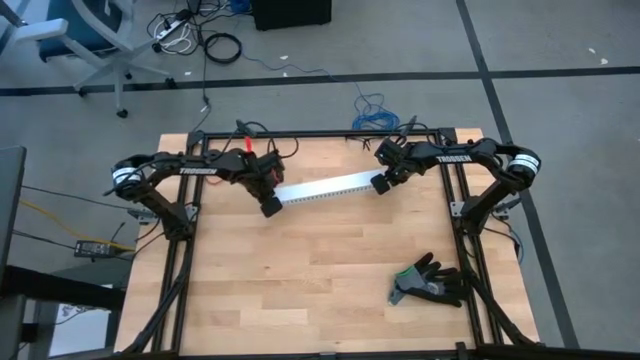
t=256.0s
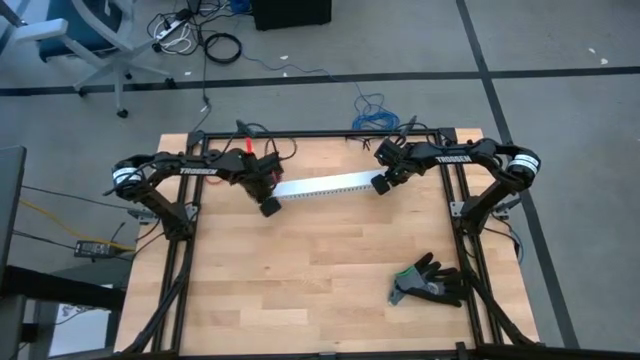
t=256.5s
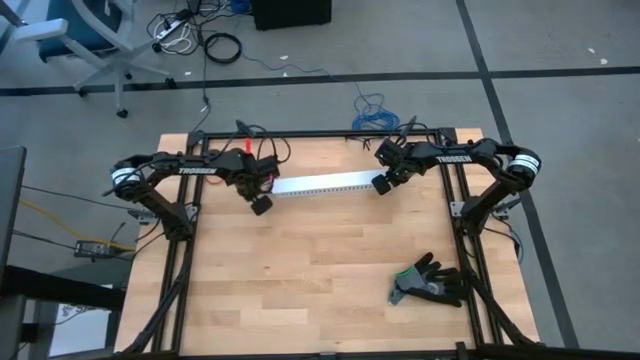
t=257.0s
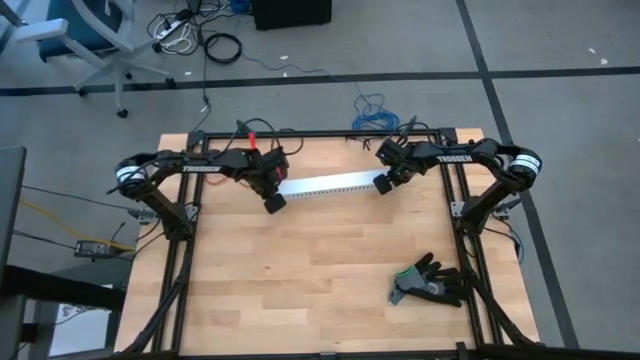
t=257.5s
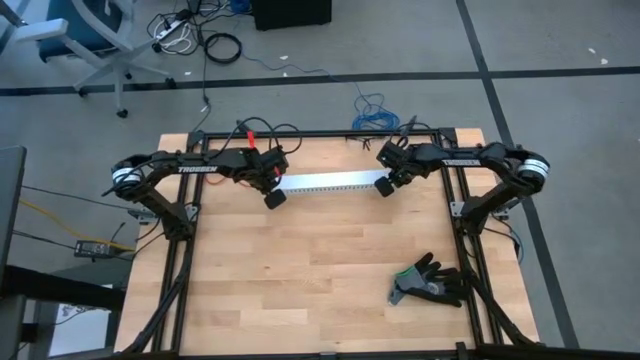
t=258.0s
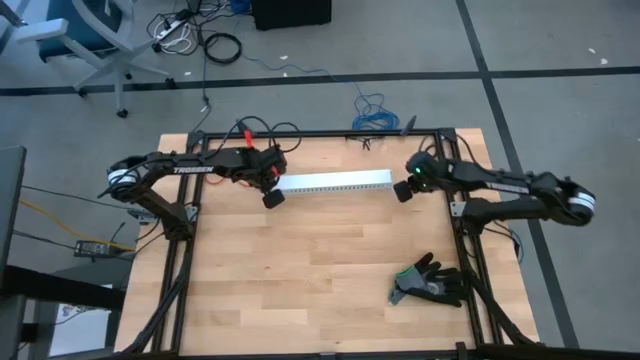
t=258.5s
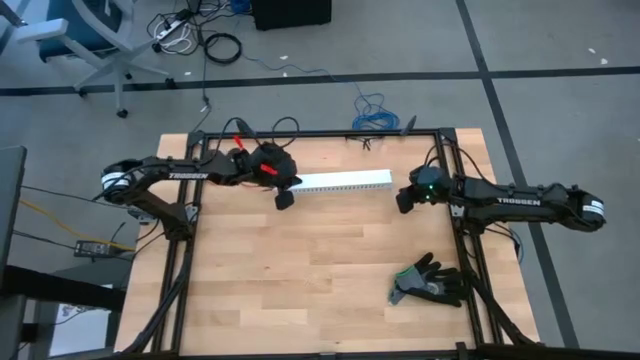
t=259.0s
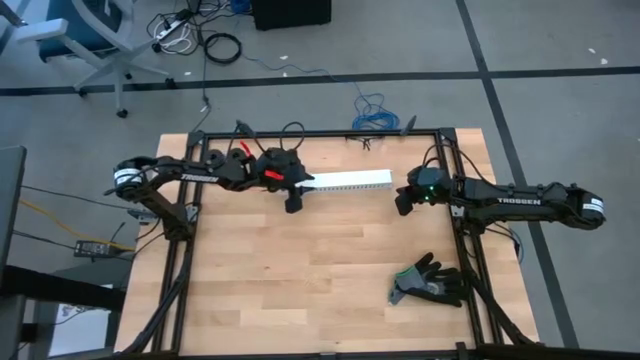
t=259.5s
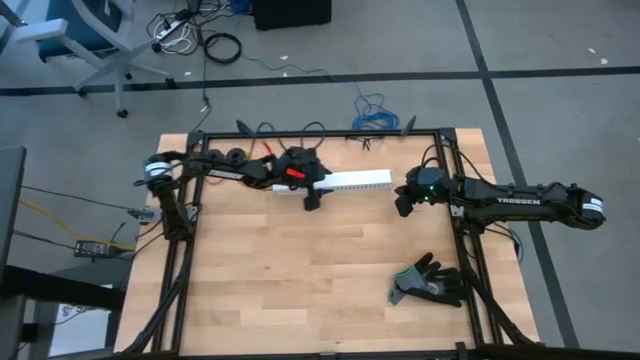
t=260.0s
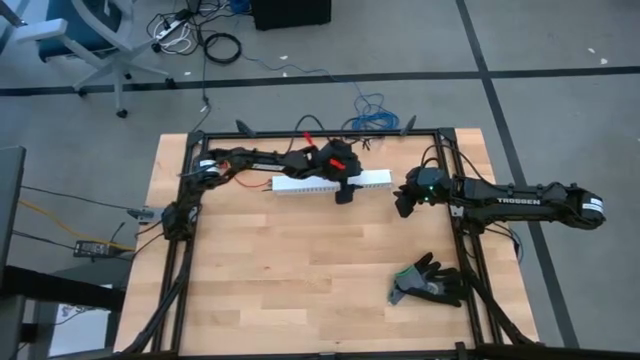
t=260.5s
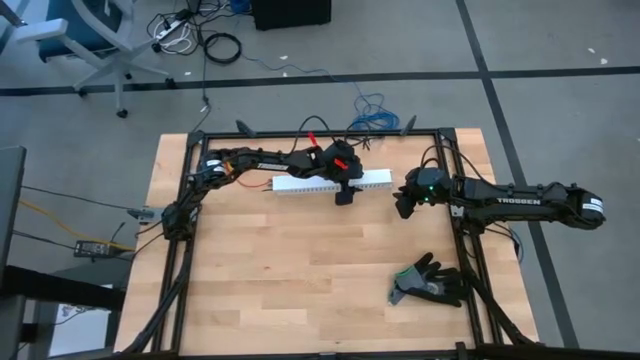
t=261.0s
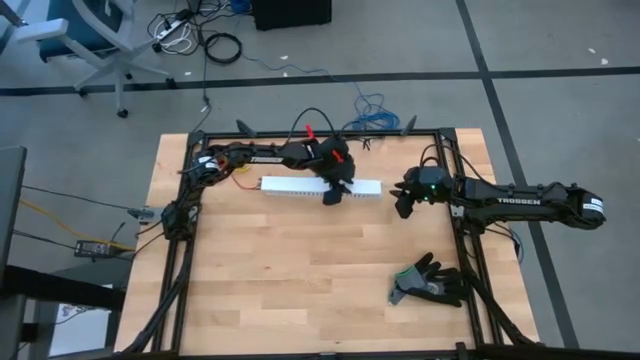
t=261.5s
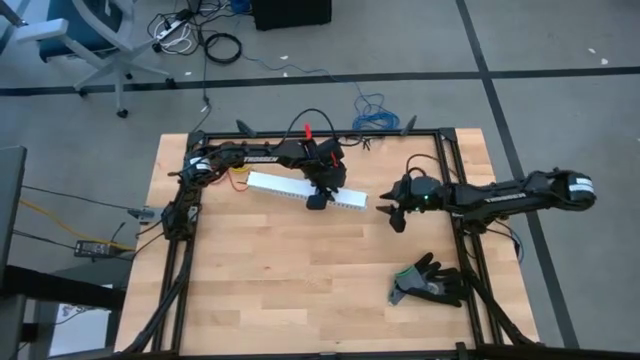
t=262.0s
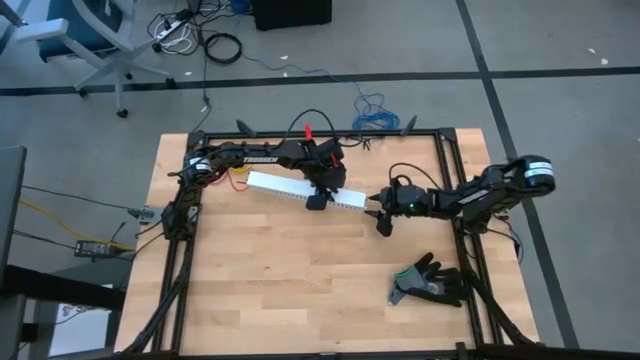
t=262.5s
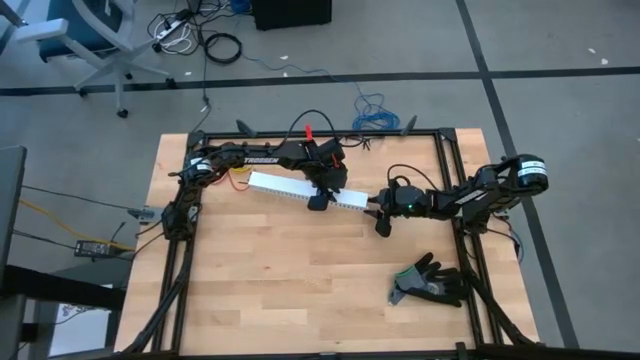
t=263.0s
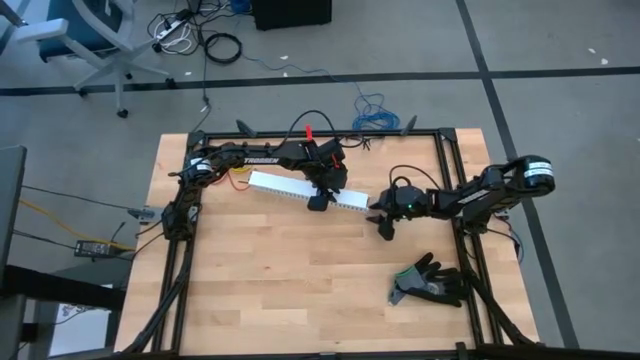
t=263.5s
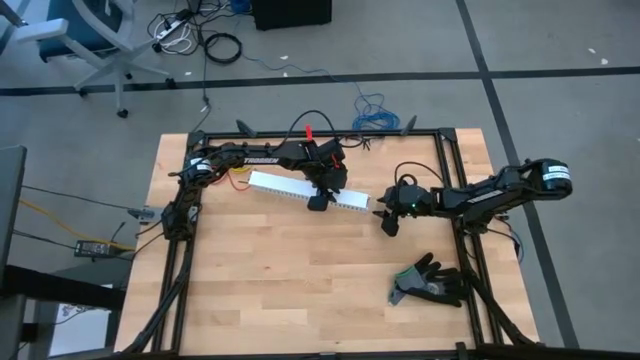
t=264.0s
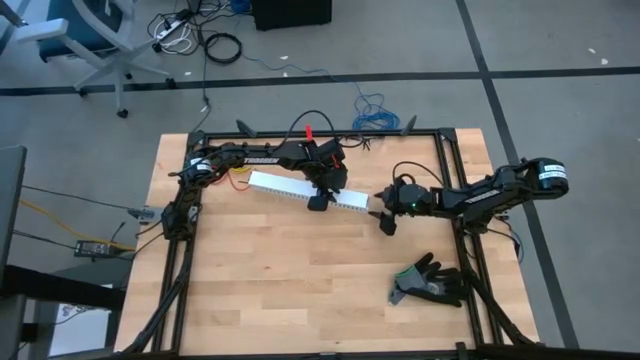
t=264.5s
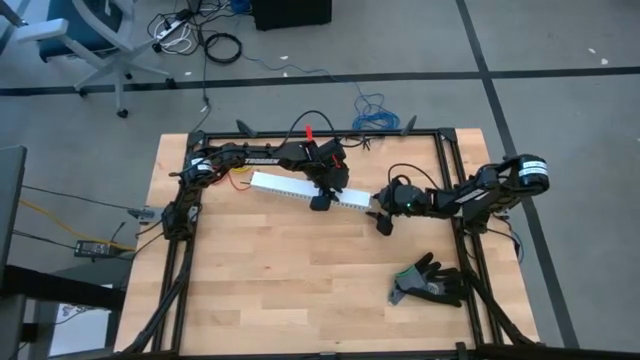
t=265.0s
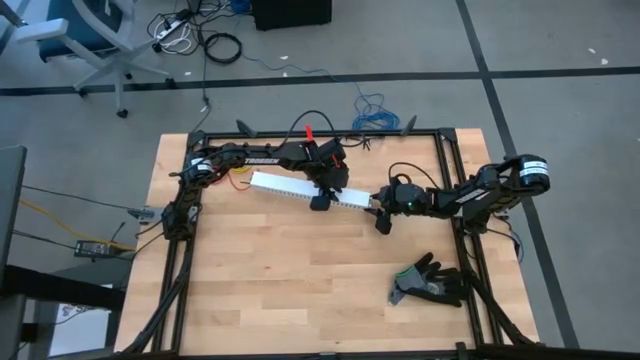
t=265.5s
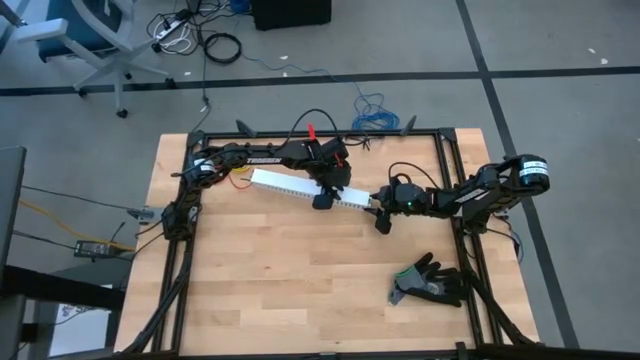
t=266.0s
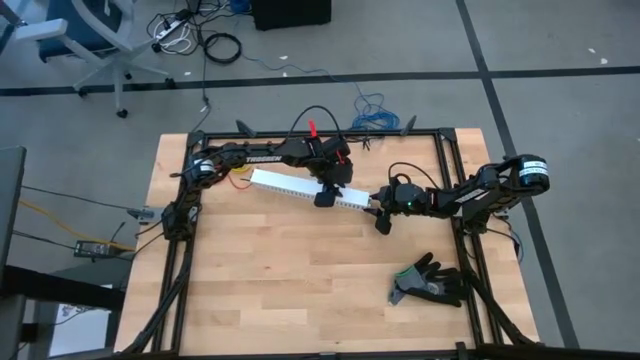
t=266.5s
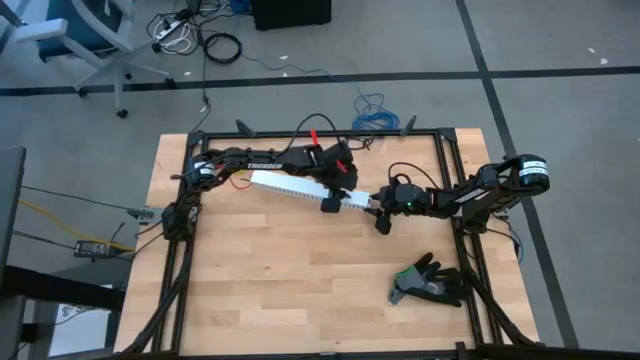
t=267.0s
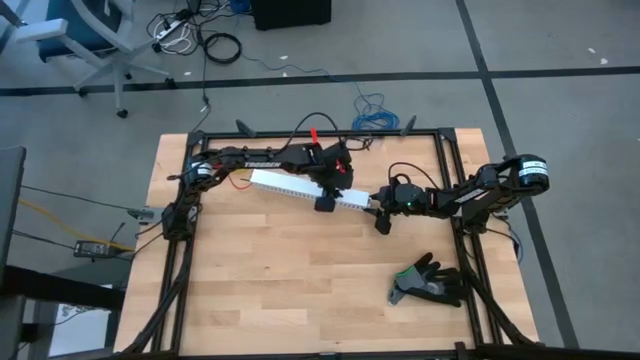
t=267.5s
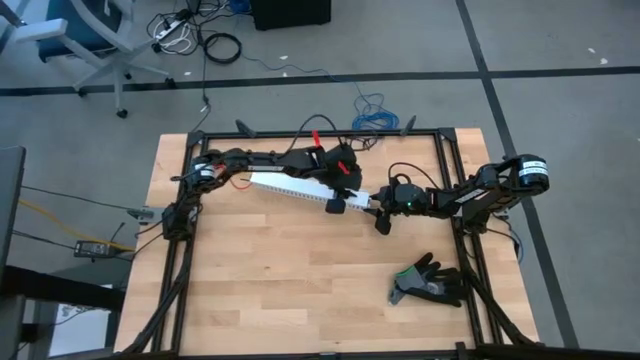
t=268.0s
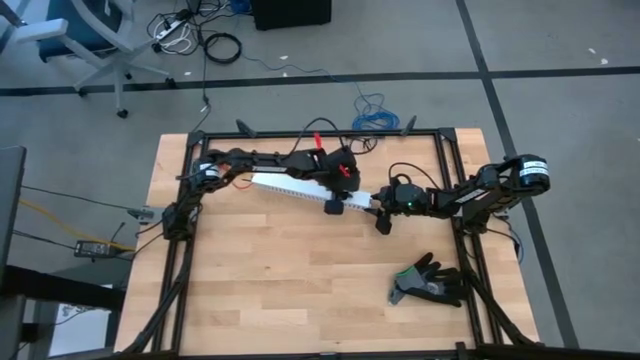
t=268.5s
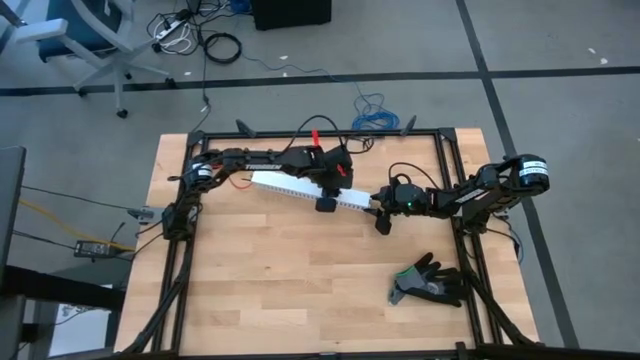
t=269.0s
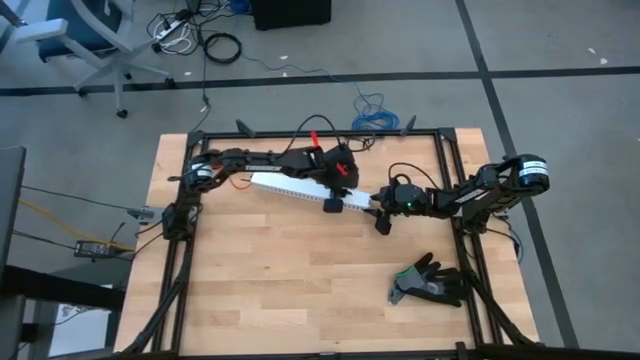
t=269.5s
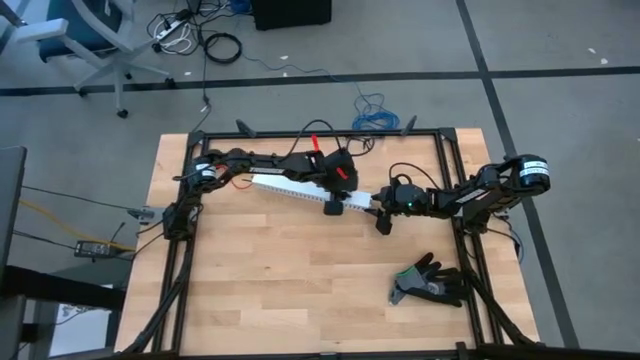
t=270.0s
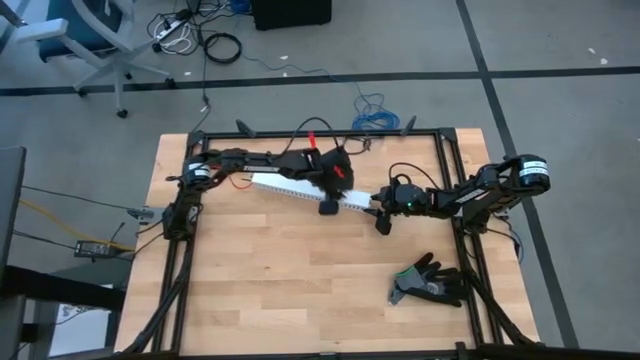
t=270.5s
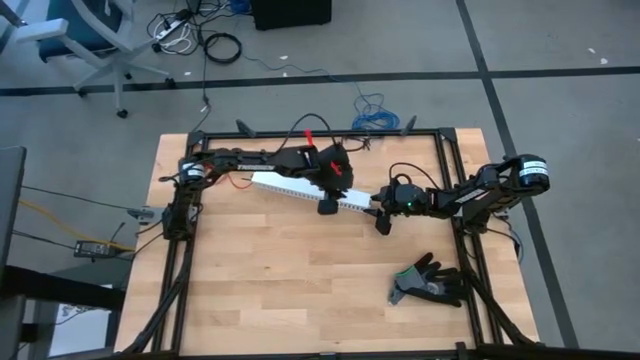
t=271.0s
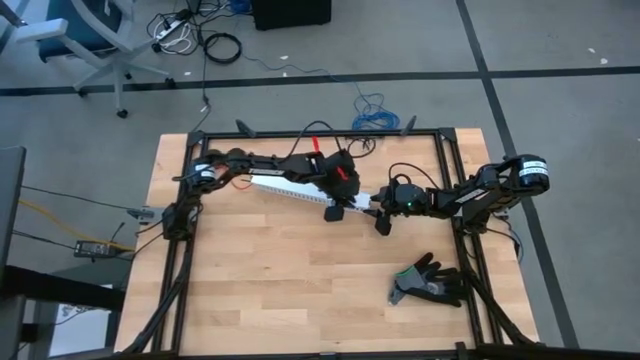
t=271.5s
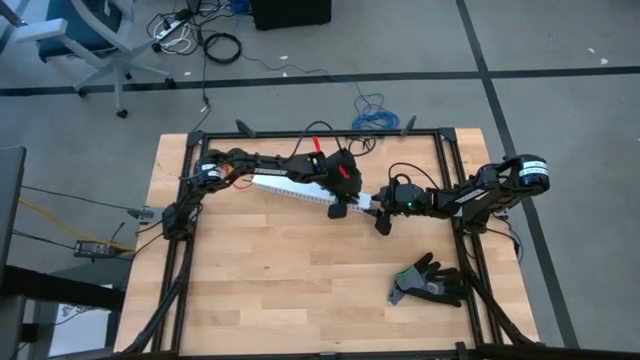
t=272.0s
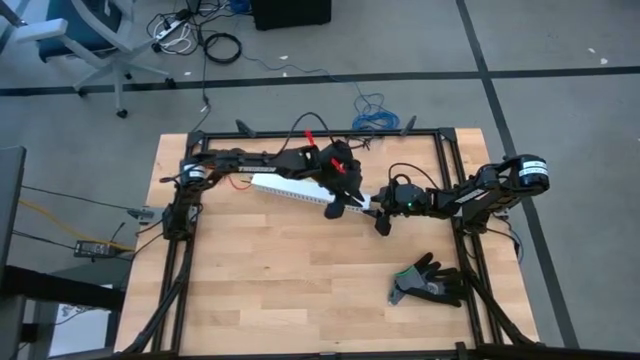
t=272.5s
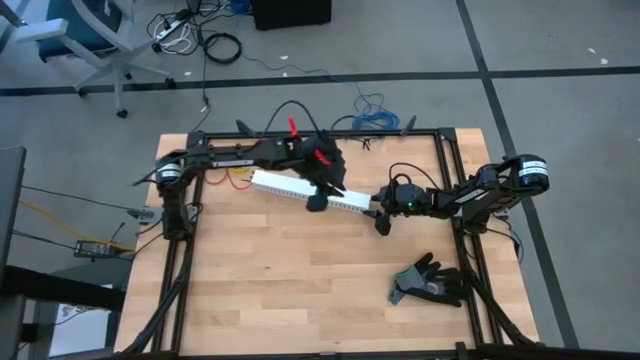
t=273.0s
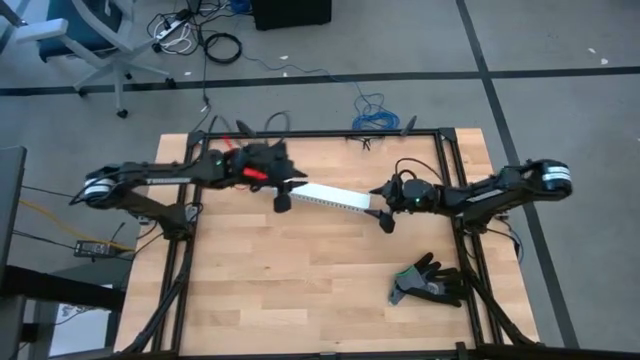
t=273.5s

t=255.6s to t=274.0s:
Task: Ziptie cables
Close the white cable duct

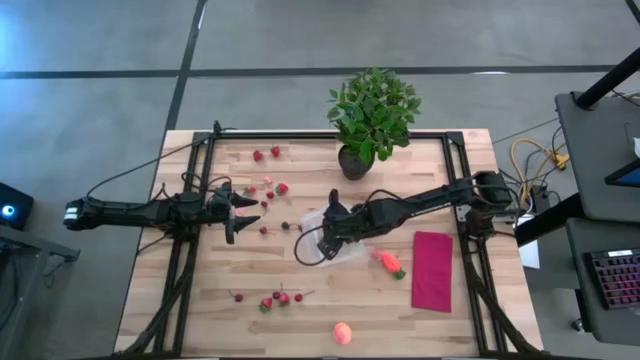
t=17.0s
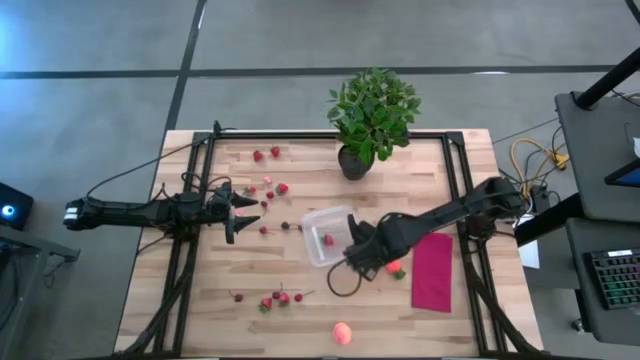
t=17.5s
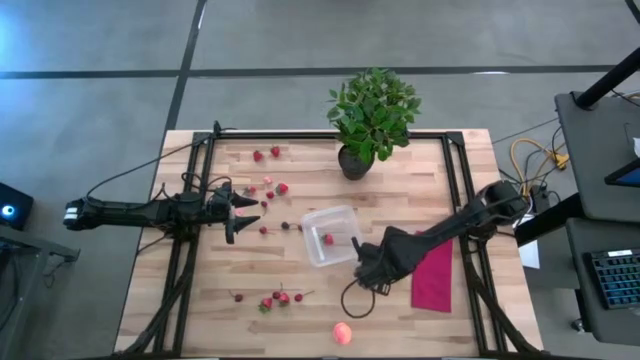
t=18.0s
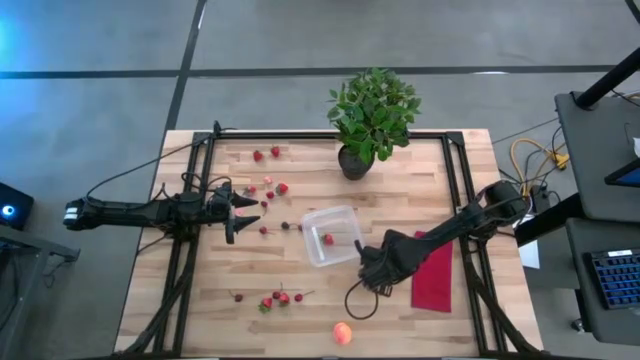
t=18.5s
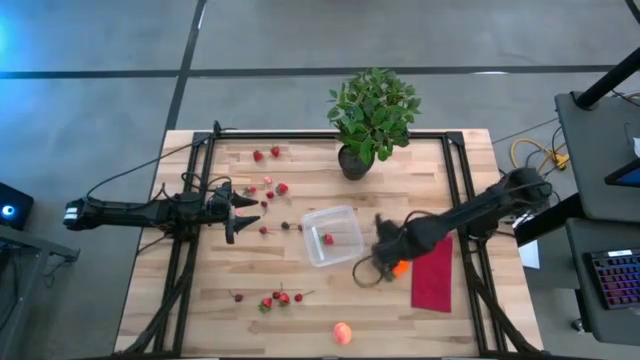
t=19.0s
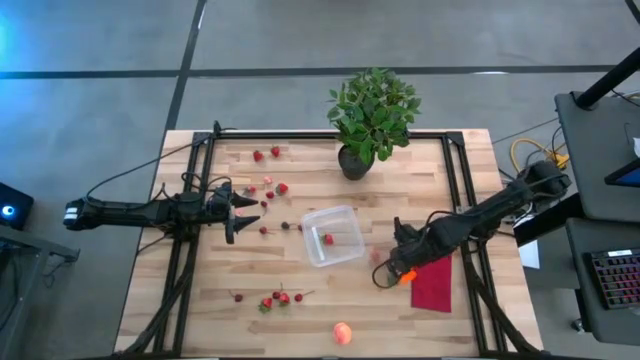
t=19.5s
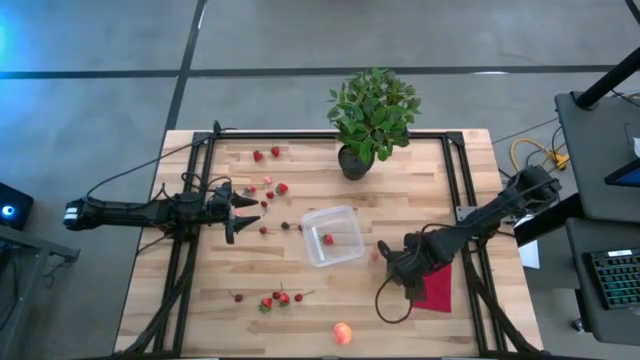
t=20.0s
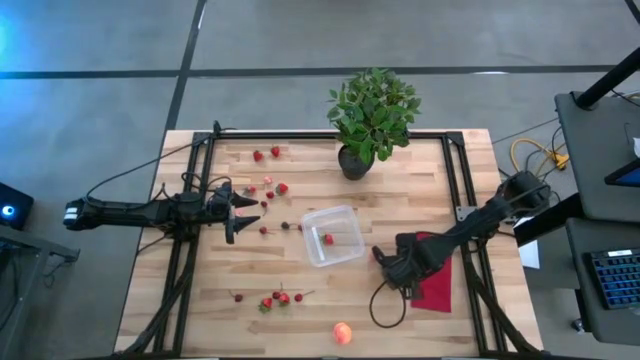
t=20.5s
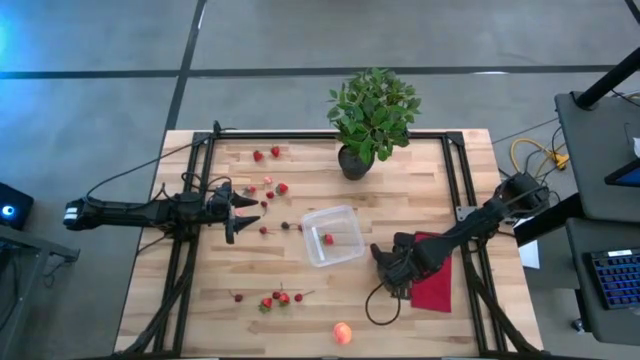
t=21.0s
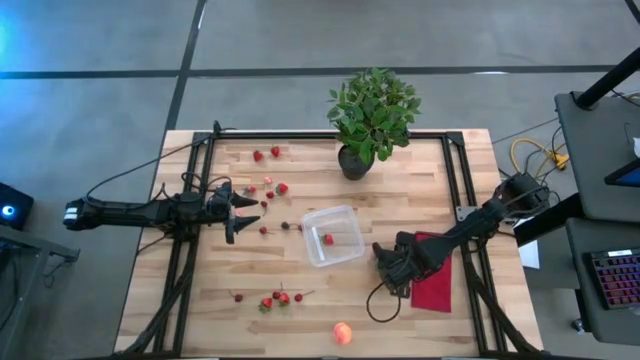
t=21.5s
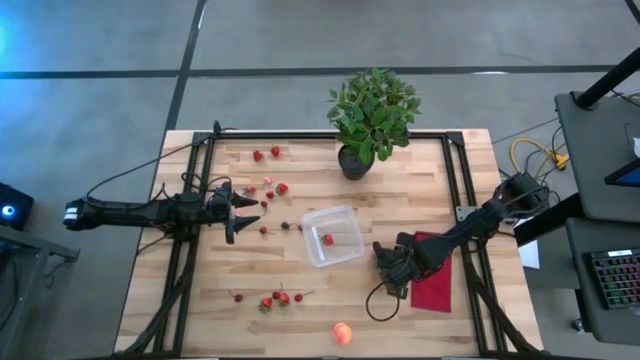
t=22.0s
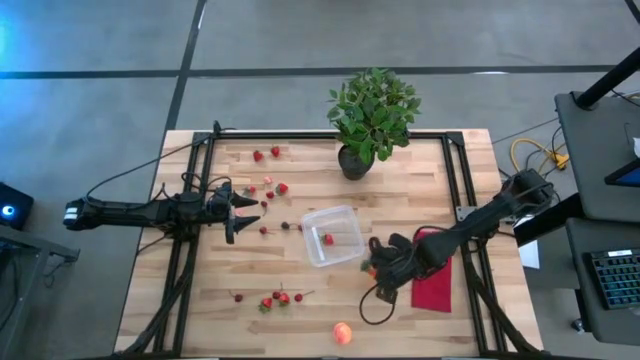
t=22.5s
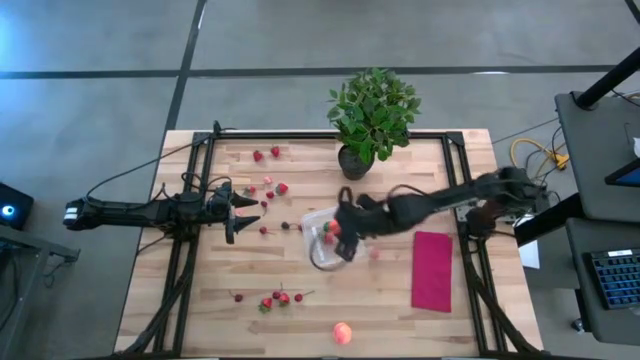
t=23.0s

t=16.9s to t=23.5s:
Task: Pick and placing Produce into tupperware
Put the orange carrot into the transparent bin
